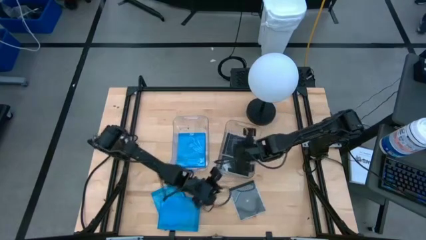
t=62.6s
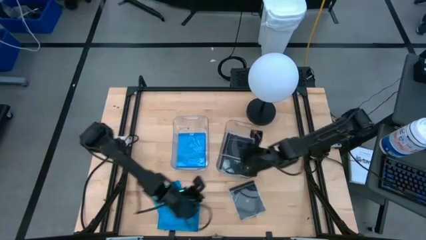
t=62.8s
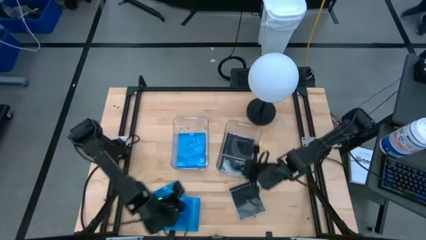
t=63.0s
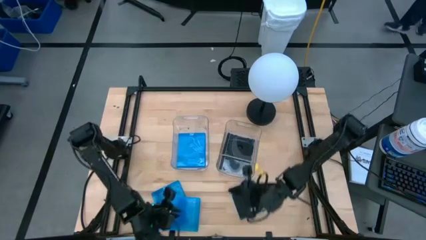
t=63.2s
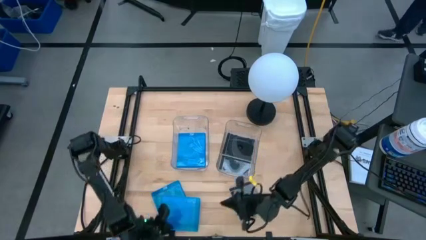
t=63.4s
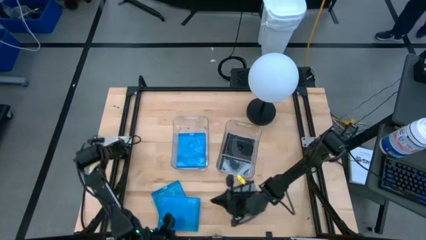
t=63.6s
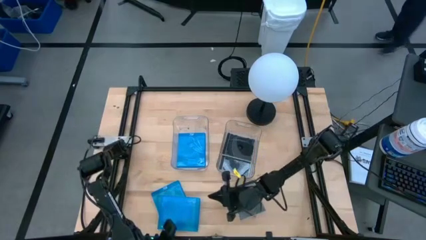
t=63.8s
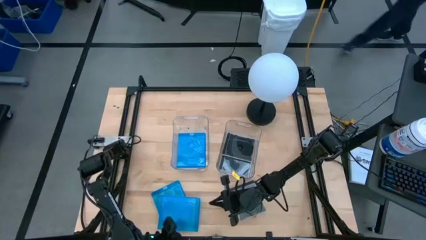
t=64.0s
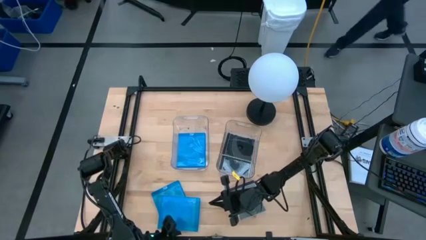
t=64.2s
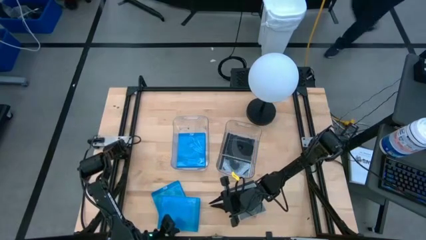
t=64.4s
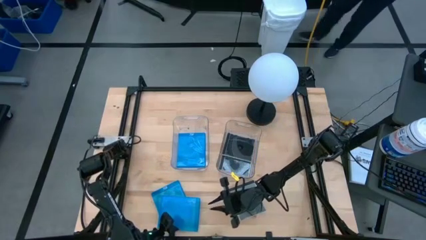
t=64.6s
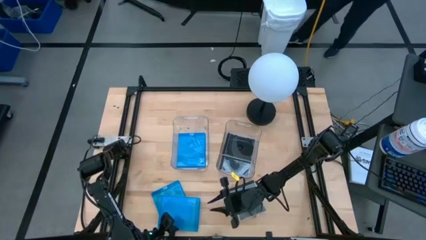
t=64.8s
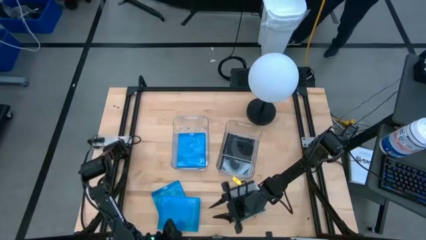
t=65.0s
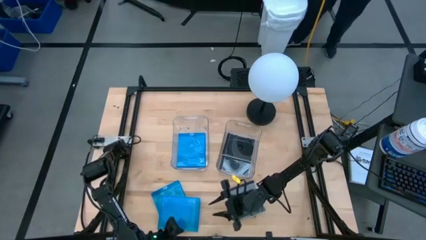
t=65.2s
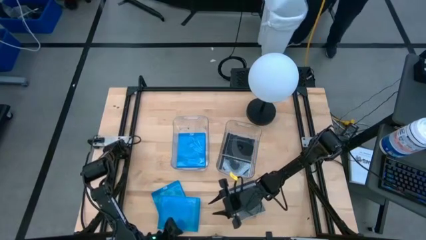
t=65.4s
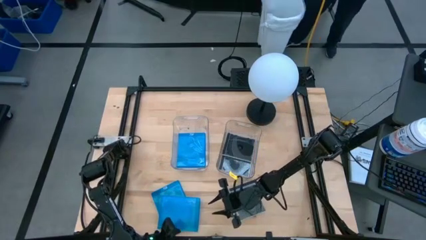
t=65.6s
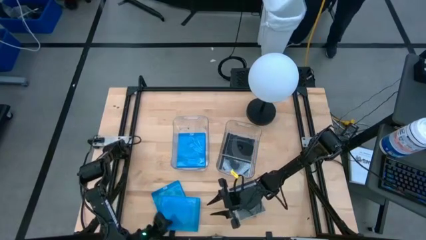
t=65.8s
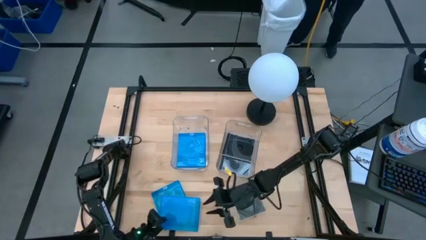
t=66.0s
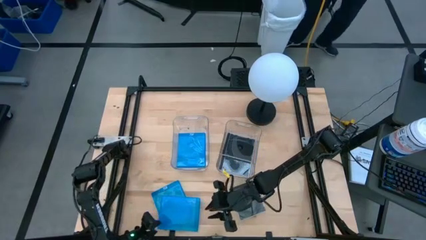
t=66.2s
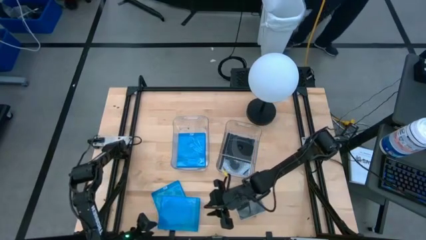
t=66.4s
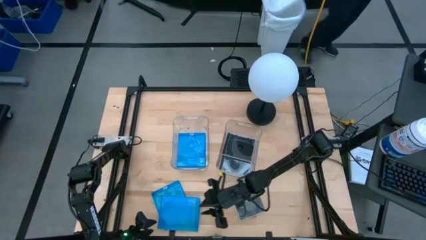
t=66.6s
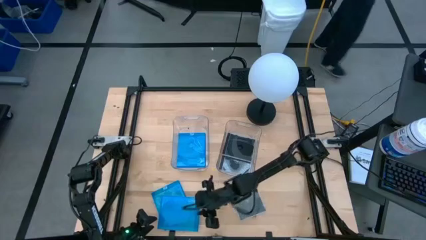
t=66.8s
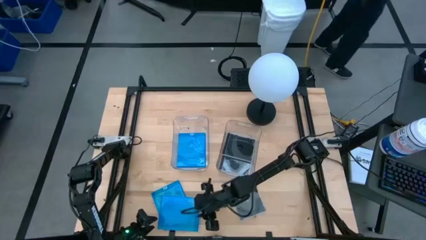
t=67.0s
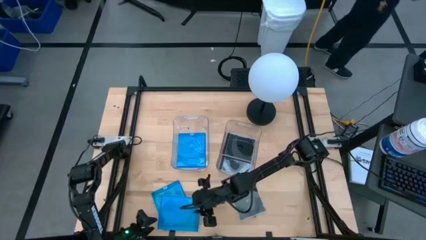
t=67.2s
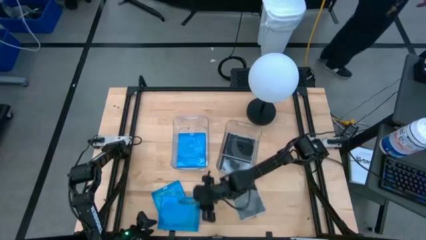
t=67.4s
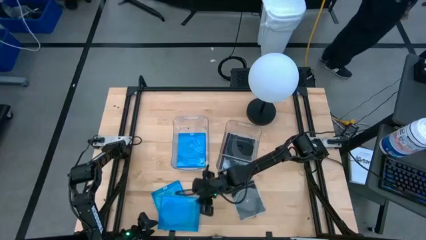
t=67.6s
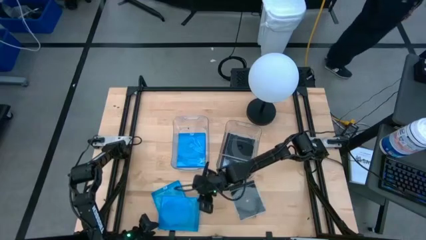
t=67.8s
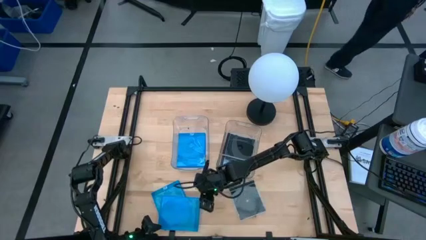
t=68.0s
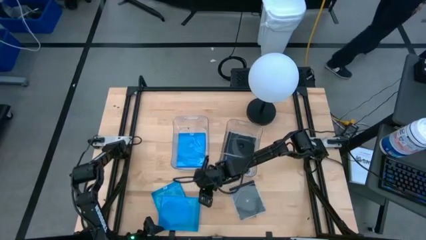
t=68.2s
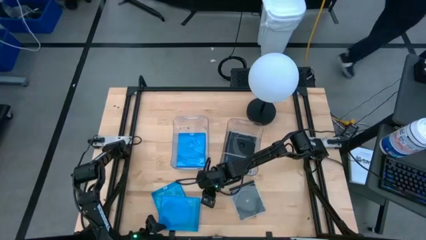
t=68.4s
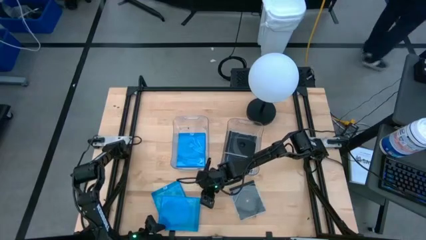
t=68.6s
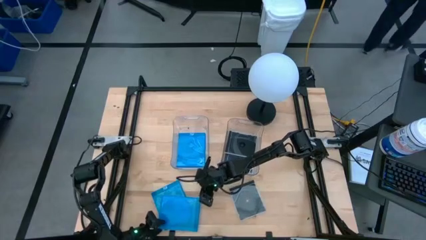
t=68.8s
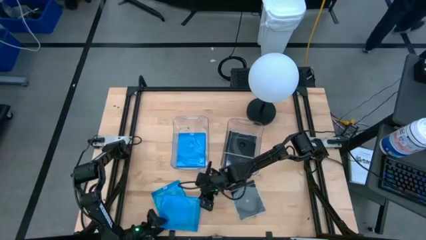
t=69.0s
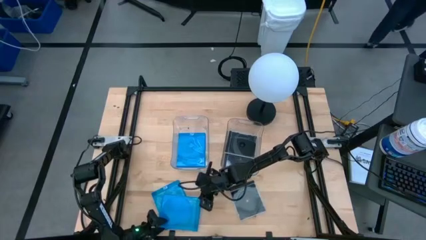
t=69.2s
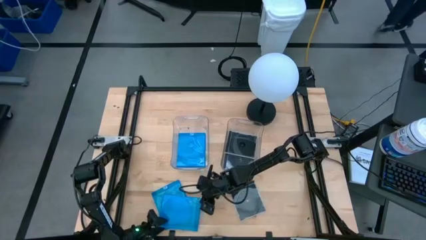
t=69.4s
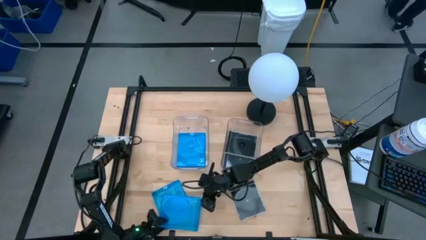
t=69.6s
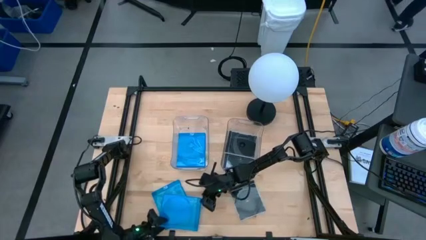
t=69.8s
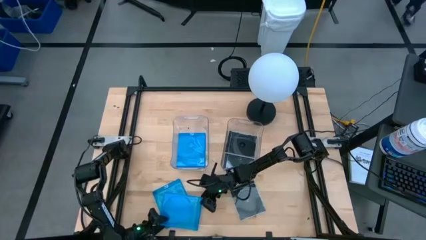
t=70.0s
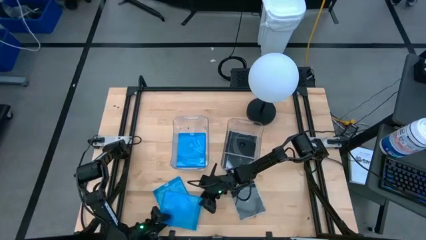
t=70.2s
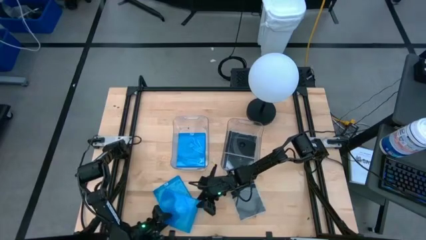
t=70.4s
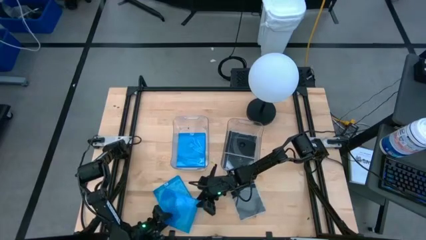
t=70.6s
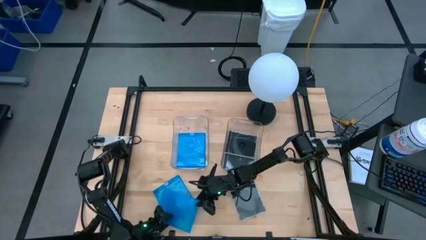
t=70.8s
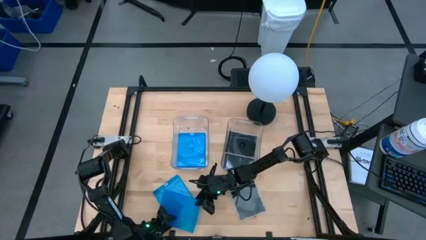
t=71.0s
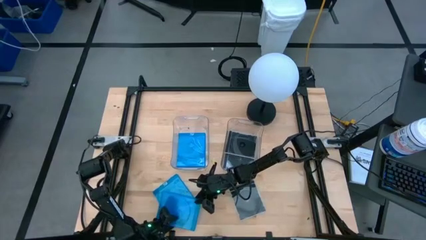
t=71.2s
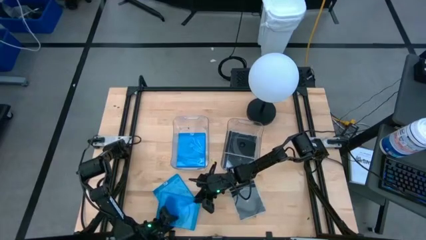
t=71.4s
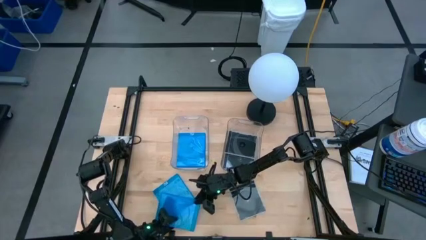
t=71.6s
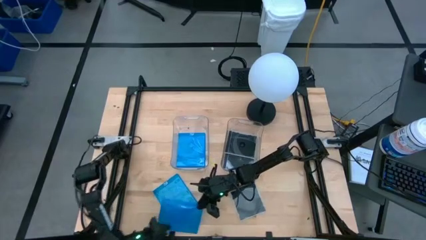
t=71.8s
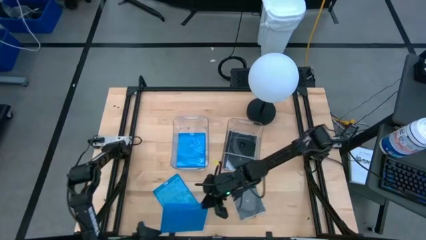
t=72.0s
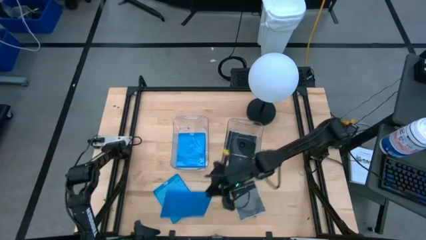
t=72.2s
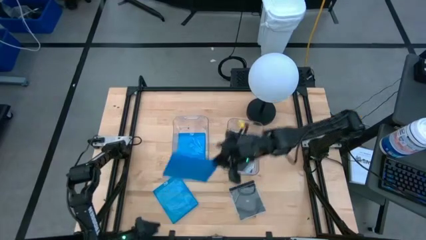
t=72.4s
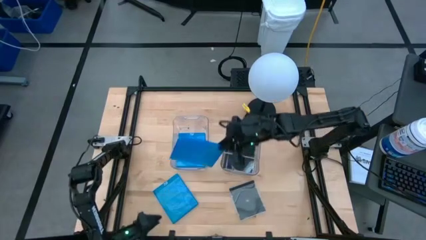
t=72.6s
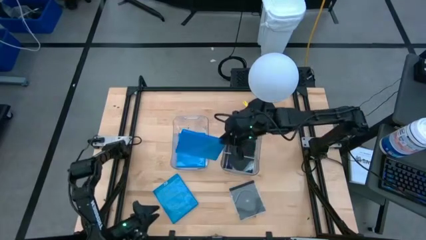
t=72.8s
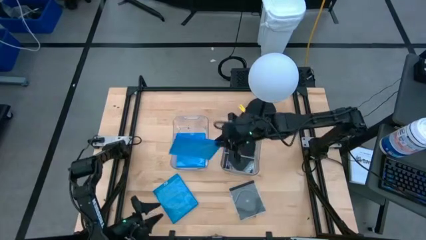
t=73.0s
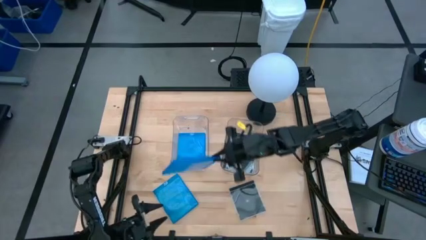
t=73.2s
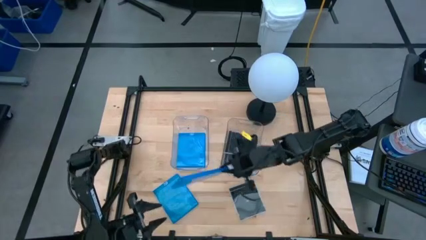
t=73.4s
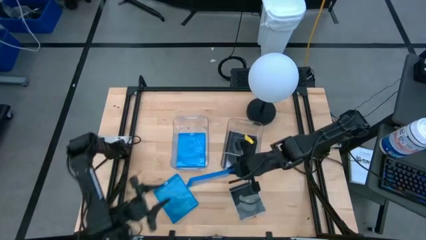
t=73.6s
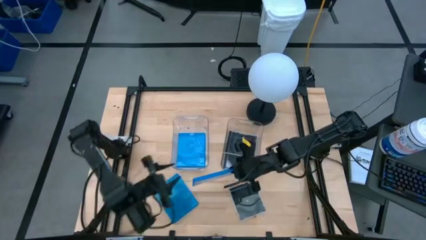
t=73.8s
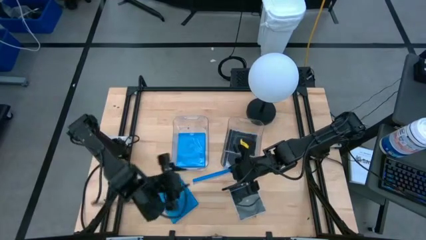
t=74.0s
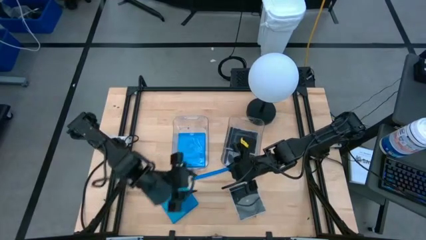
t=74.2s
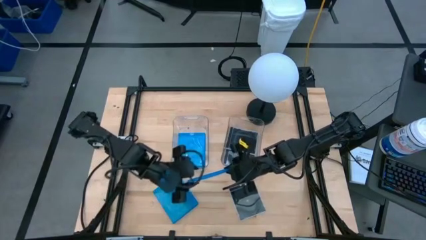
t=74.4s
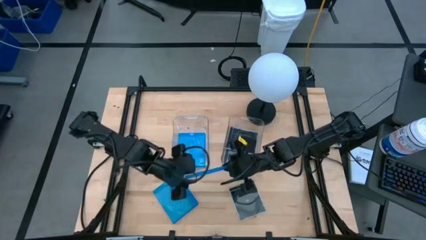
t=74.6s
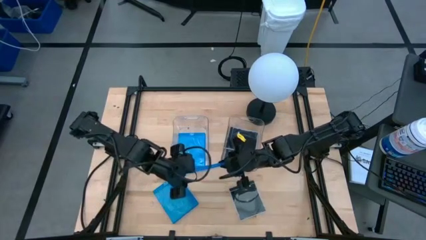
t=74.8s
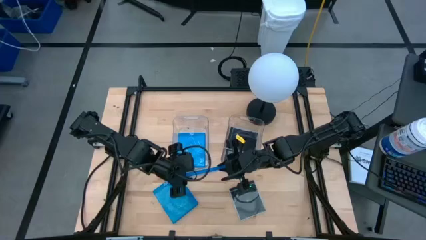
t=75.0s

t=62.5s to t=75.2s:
Task: Pick & place jewel cases by type
Put the blue CD case into the left transparent bin

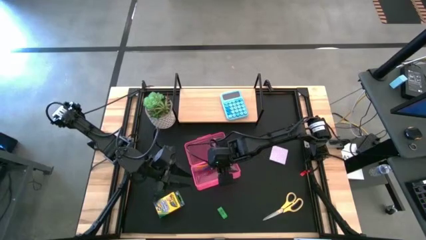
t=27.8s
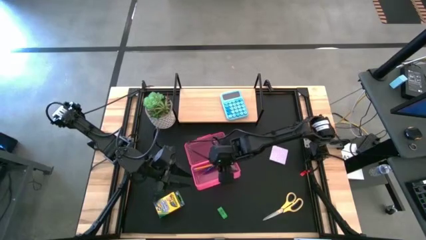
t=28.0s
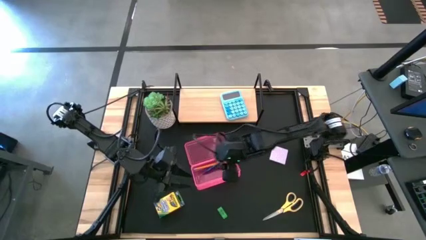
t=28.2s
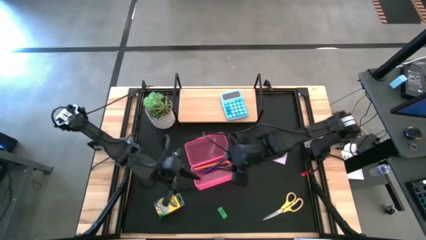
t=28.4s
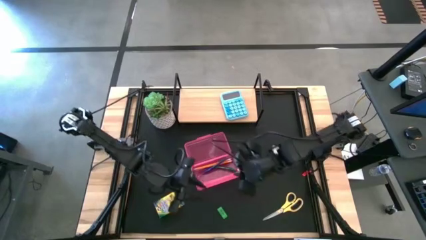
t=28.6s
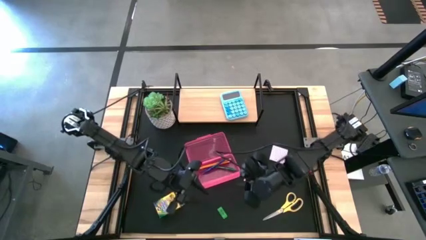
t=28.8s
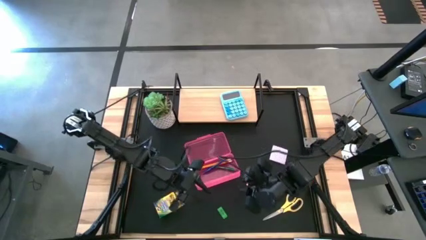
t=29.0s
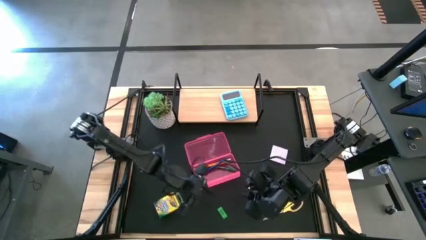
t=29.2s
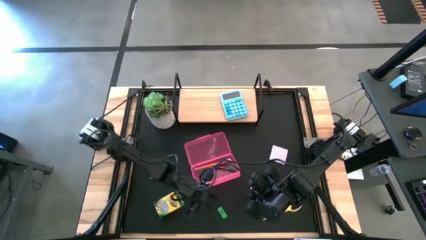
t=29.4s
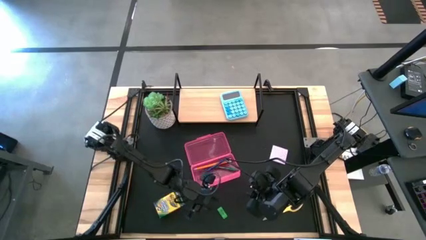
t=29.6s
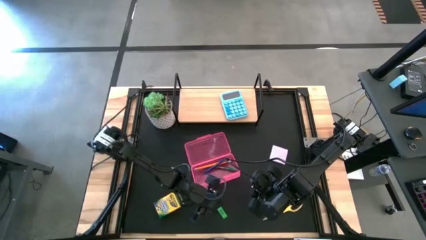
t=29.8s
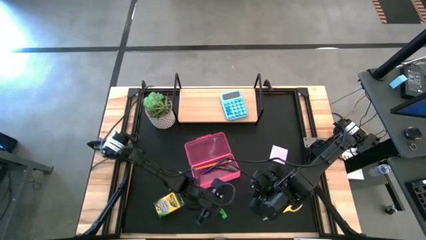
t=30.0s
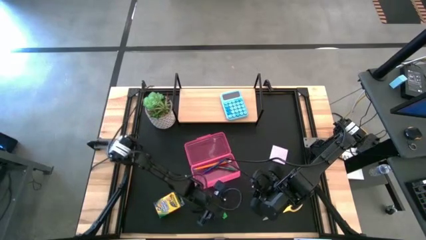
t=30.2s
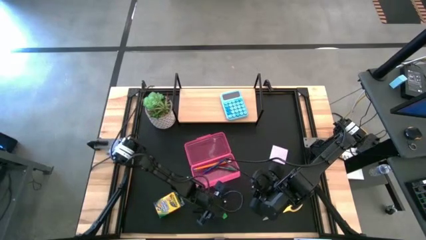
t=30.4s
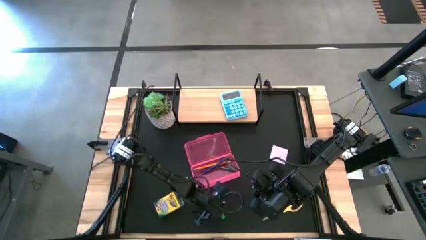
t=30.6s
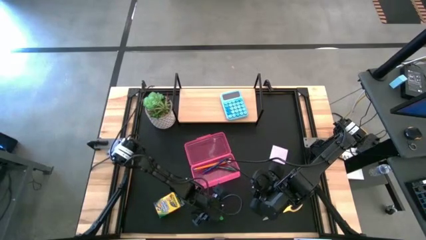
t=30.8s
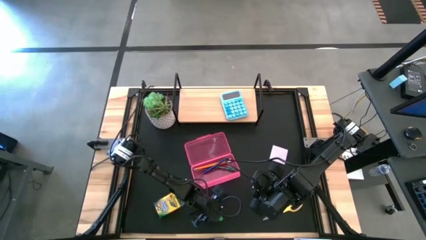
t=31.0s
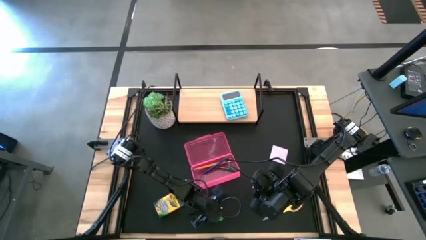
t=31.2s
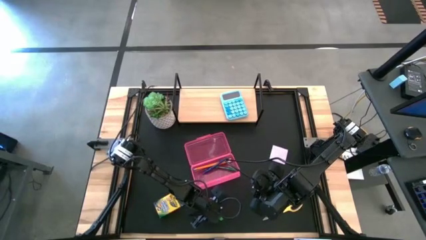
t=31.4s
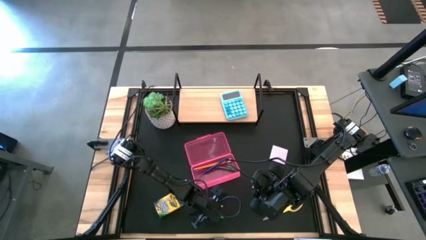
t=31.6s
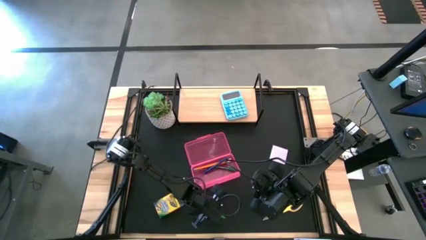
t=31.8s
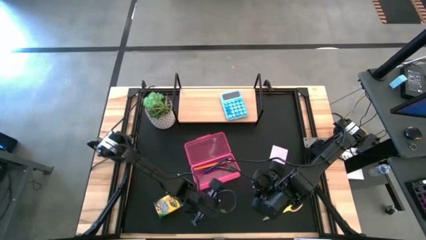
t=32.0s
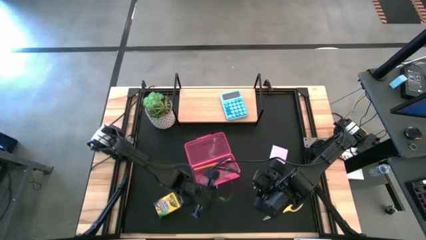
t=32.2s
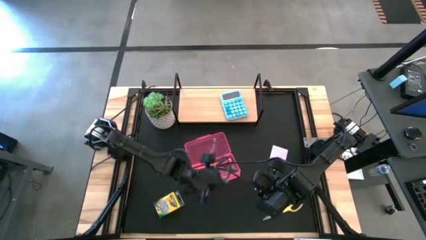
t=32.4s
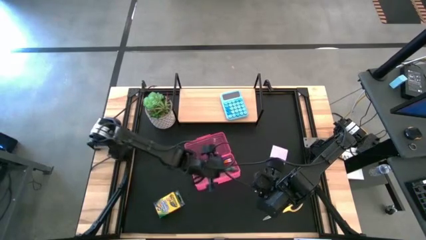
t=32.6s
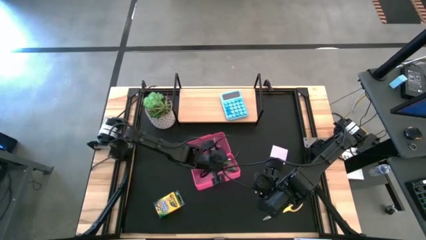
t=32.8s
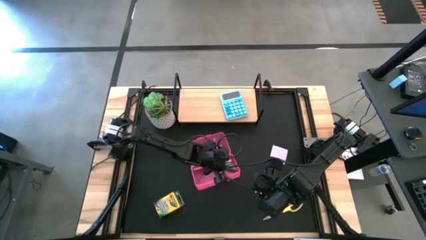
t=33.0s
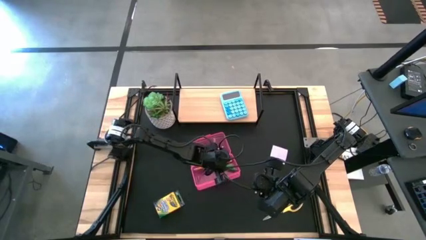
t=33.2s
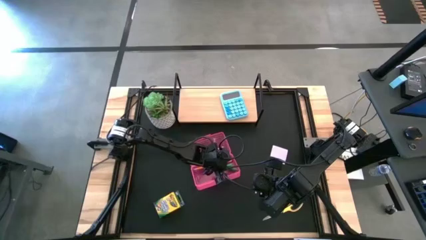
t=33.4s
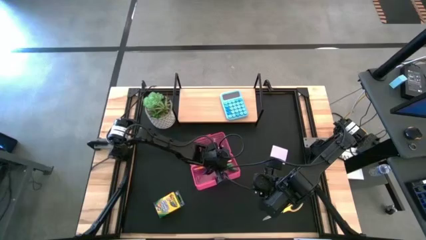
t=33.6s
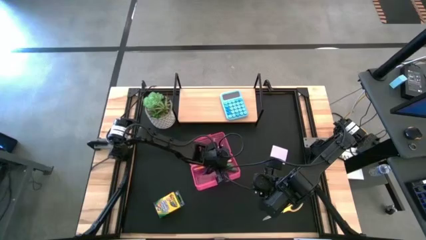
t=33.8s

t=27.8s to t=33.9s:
Task: Pack school essentials
Put the green eraser into the red supply box
